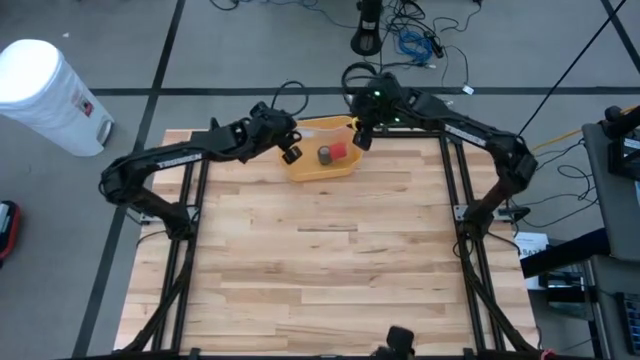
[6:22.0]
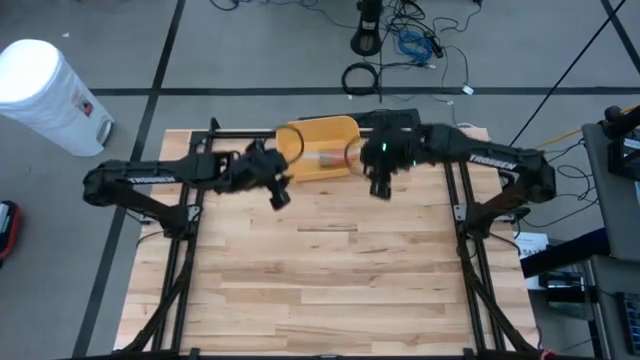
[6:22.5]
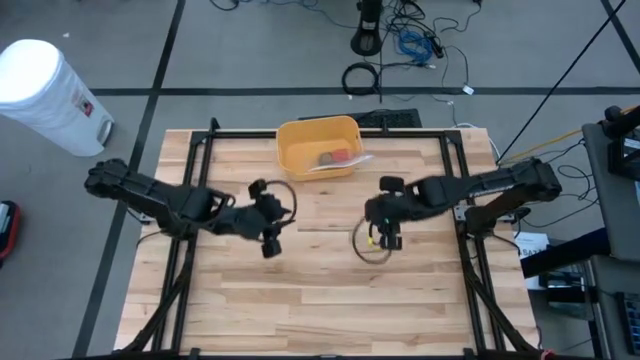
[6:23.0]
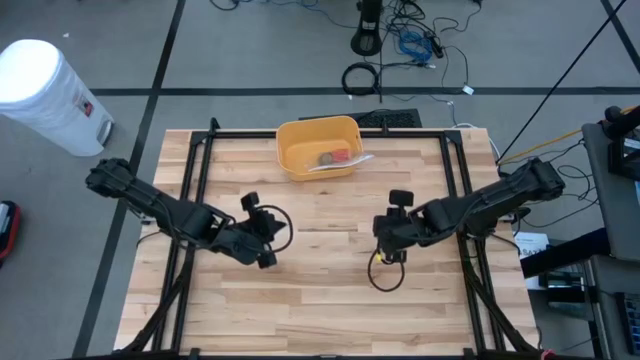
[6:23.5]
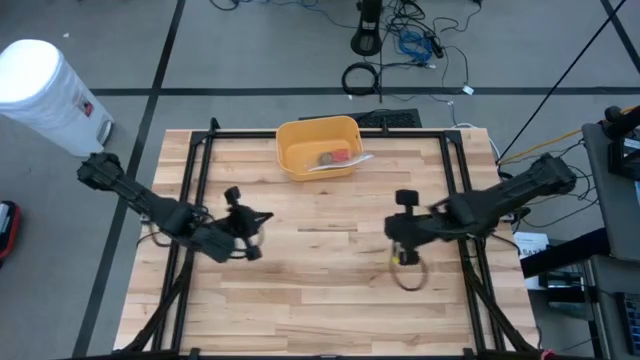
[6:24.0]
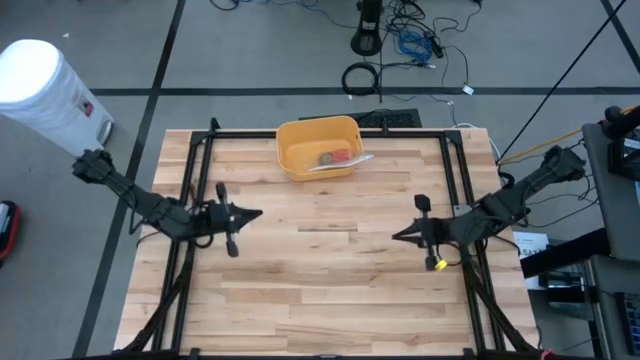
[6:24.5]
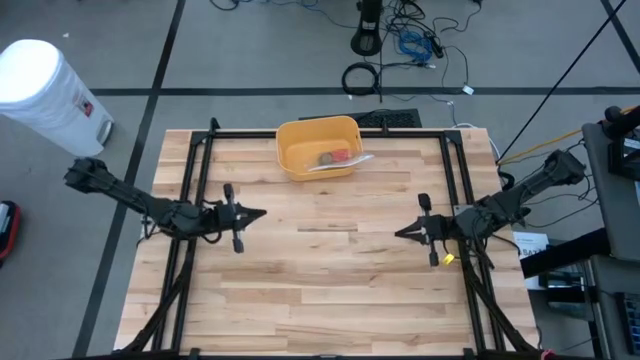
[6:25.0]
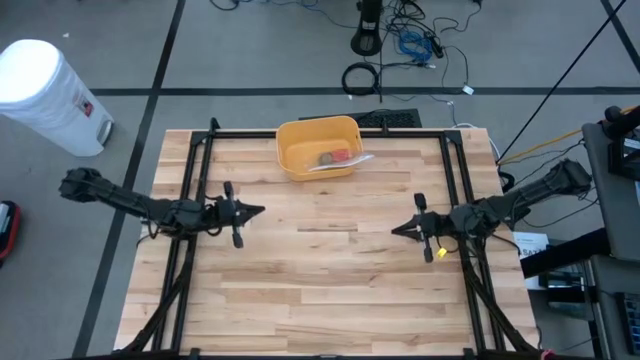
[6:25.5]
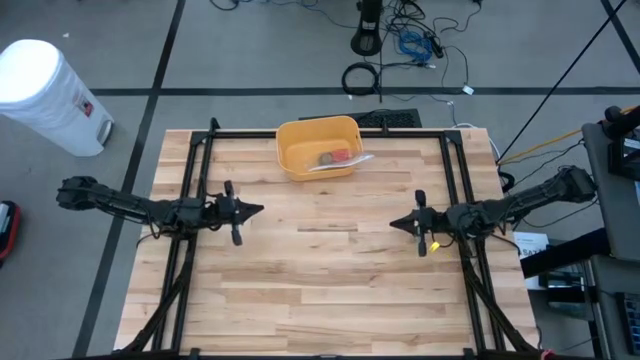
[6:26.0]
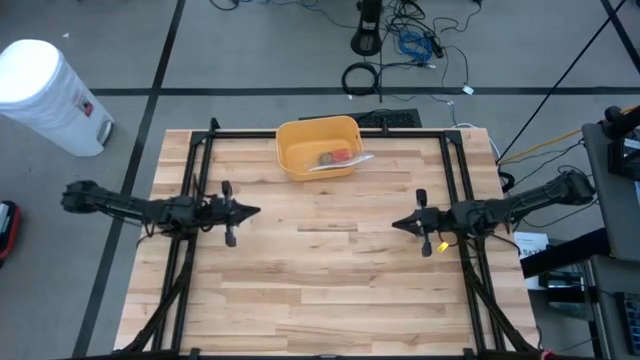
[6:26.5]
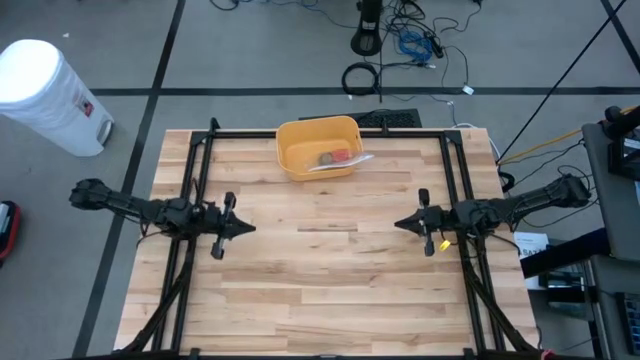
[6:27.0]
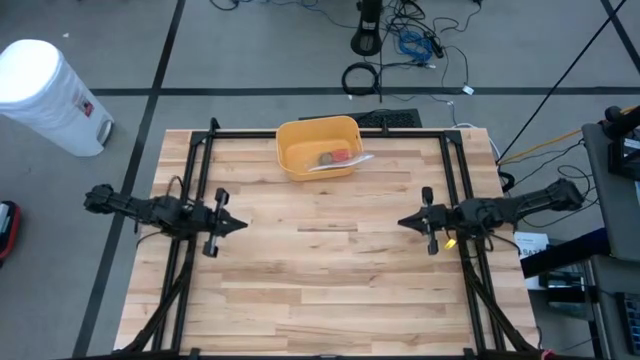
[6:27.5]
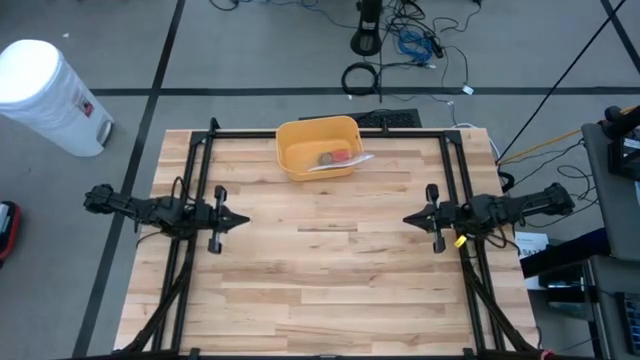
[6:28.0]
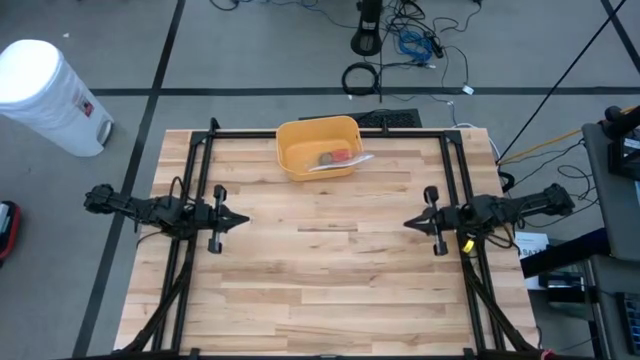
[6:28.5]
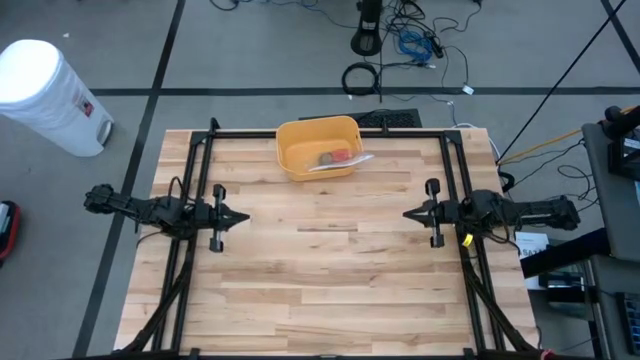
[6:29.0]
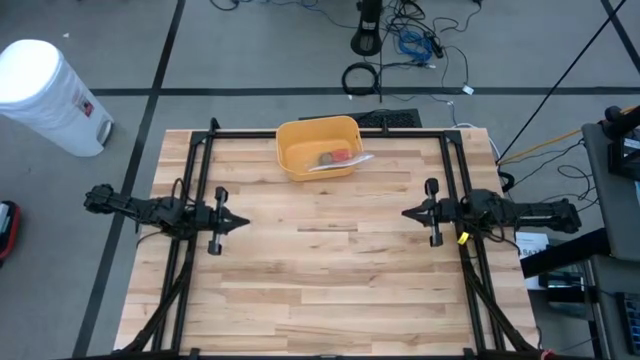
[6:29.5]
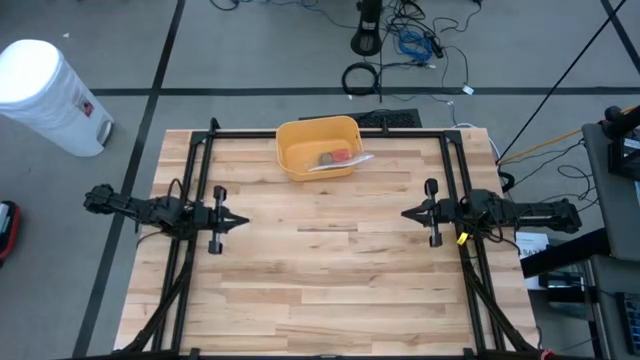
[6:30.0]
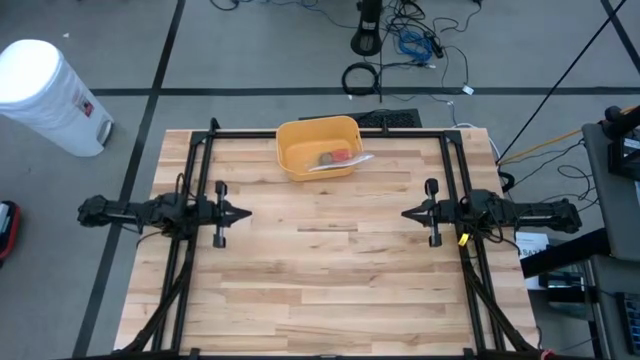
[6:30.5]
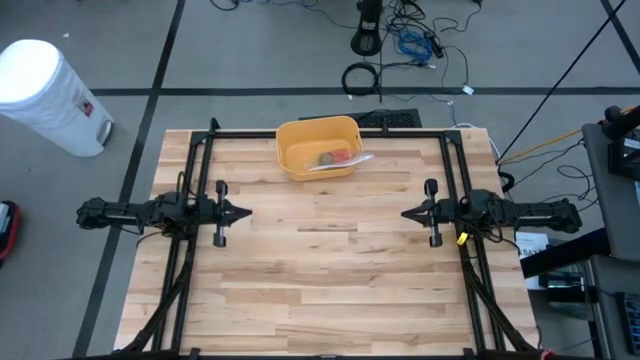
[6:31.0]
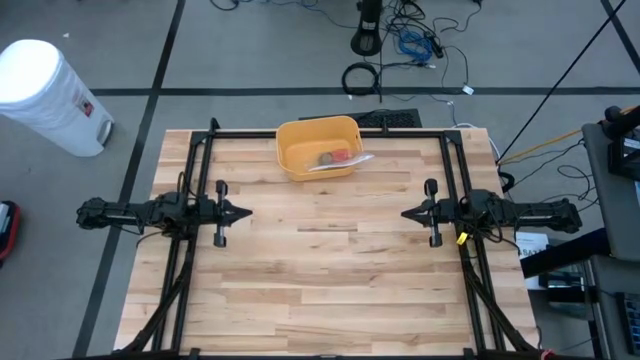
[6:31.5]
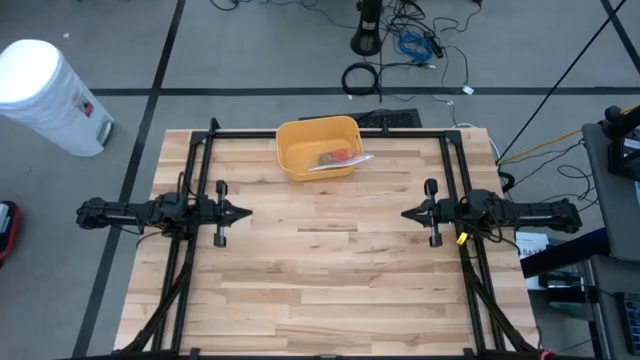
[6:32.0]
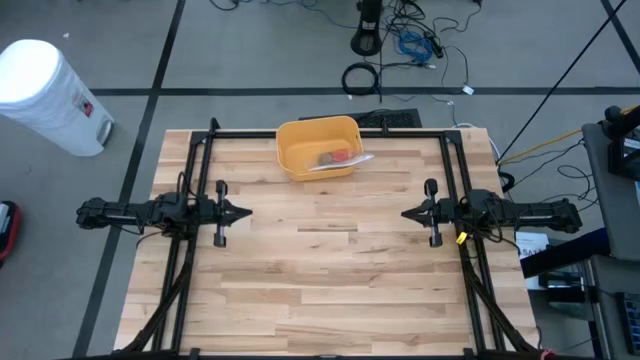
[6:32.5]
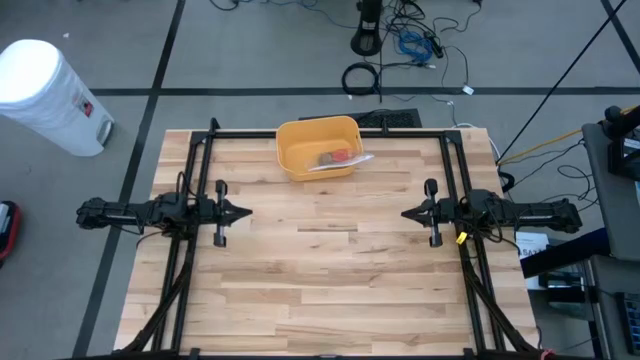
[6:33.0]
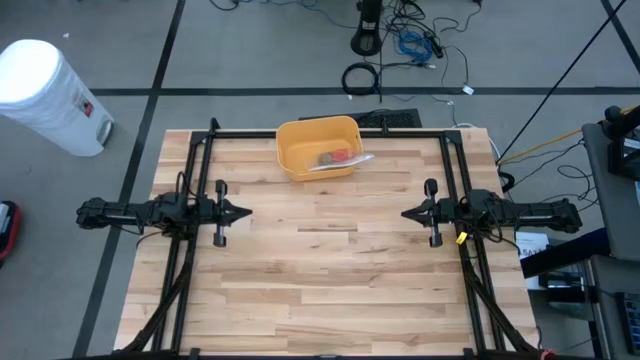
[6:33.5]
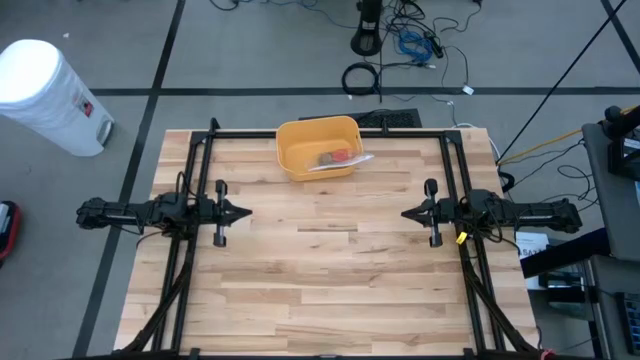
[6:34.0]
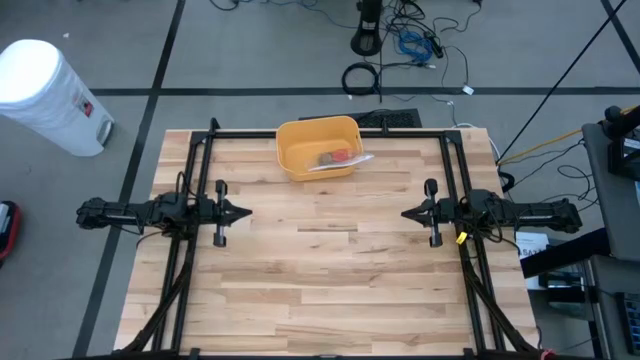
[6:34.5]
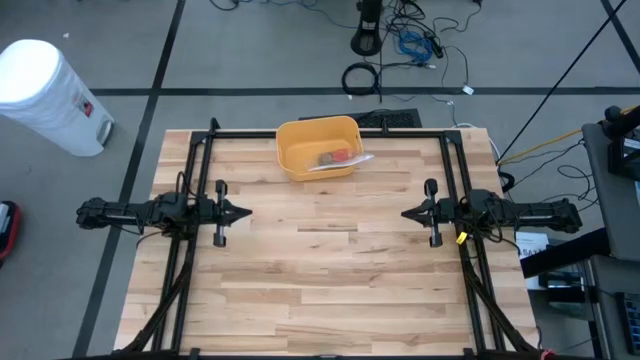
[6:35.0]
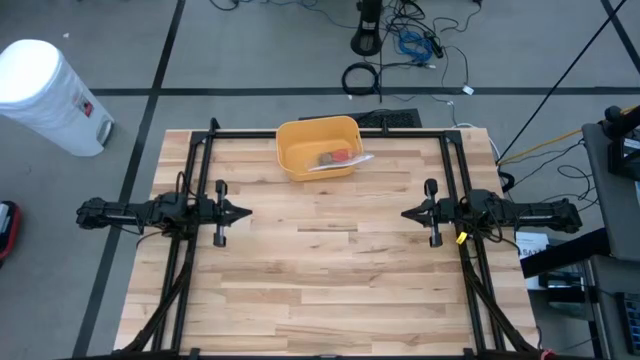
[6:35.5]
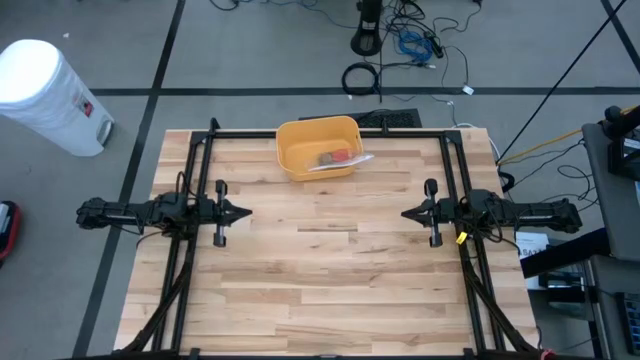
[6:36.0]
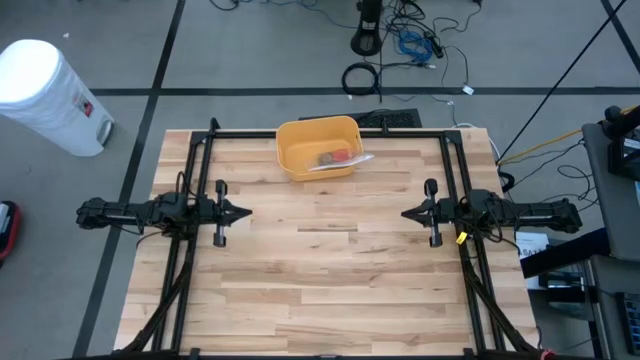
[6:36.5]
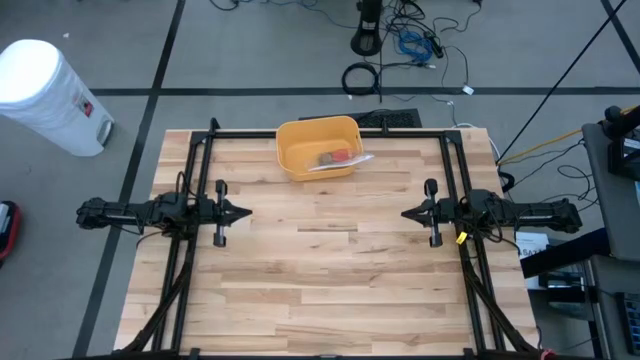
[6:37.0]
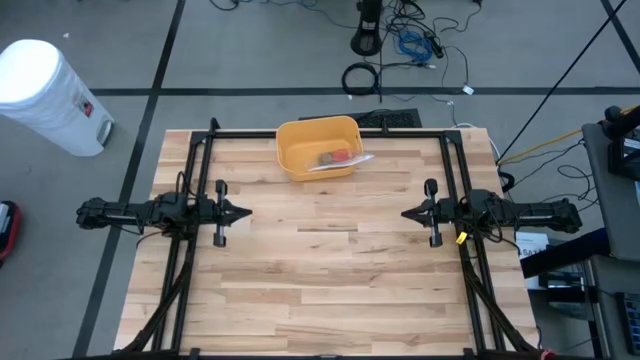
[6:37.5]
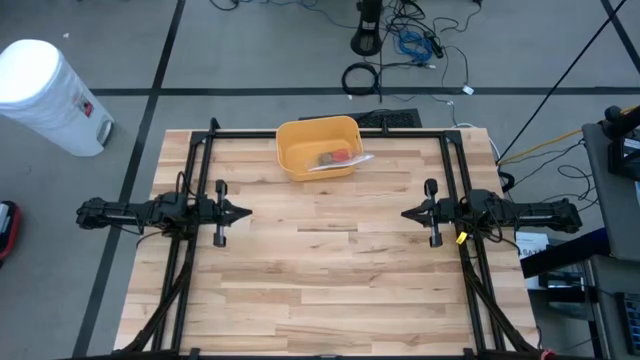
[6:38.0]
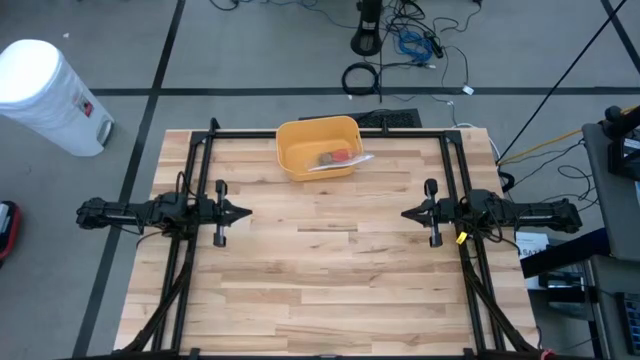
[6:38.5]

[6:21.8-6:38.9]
Task: Roll bandage
Return to Home Position

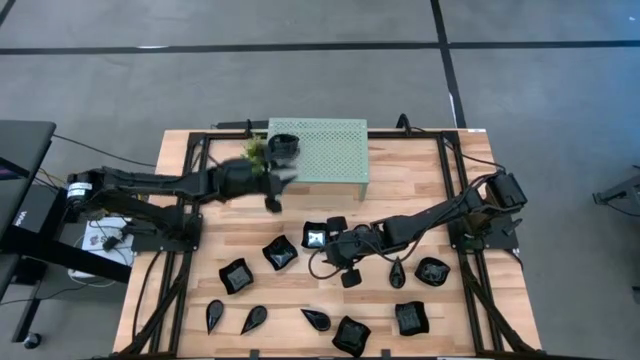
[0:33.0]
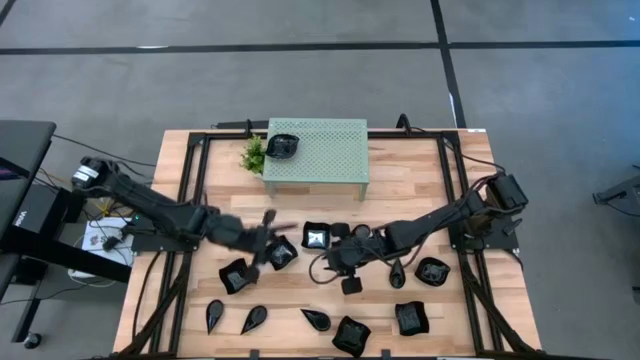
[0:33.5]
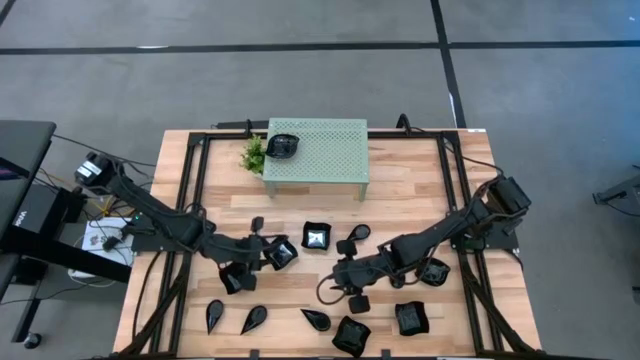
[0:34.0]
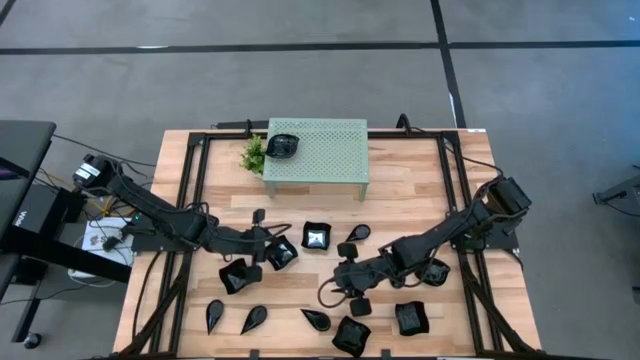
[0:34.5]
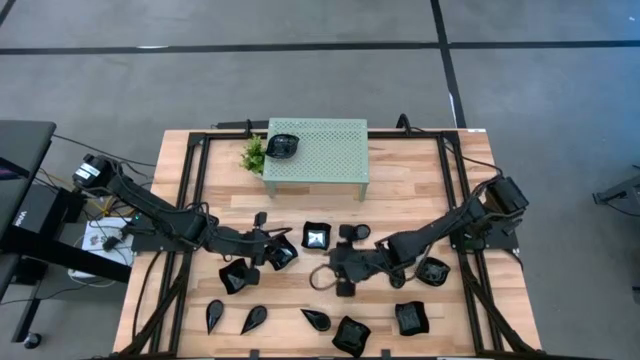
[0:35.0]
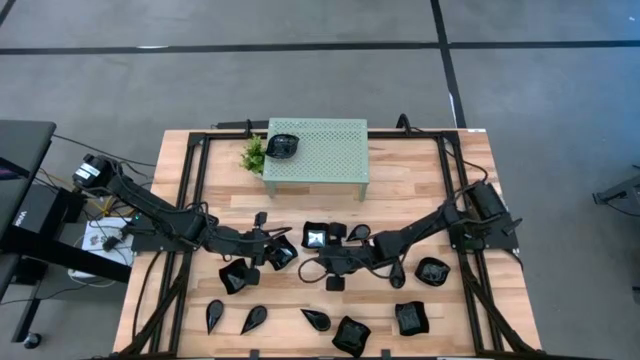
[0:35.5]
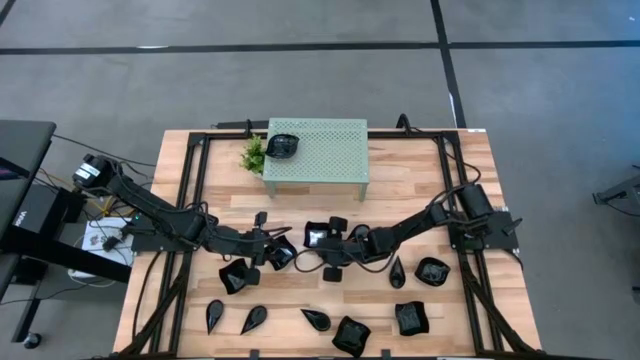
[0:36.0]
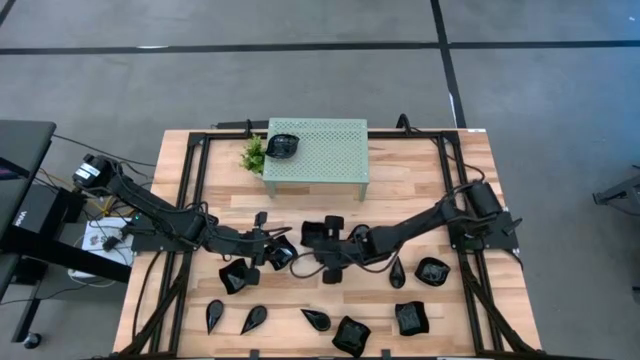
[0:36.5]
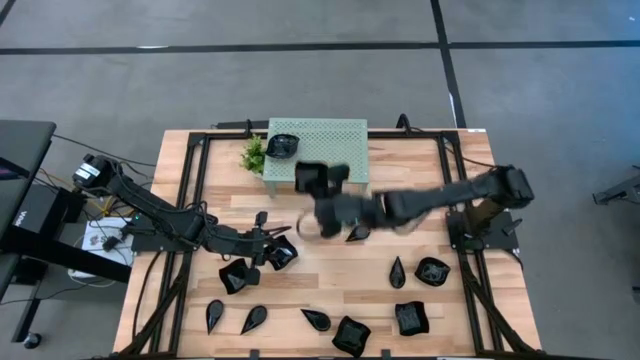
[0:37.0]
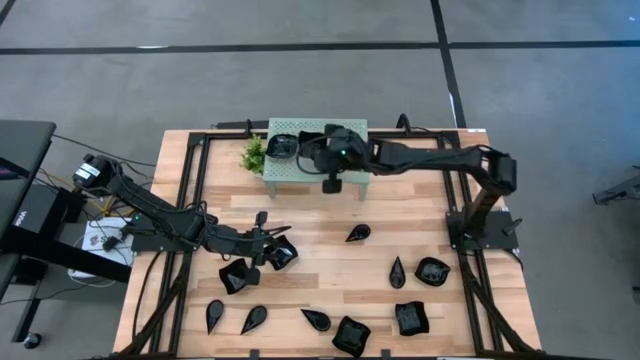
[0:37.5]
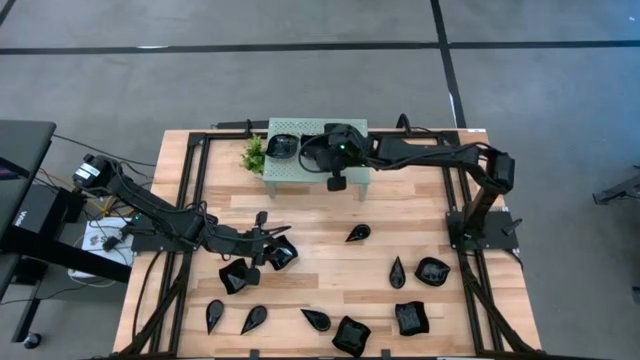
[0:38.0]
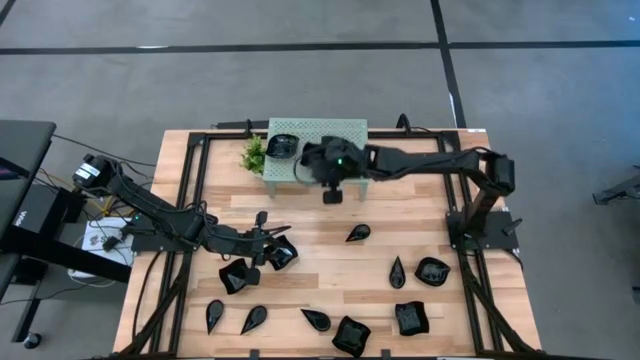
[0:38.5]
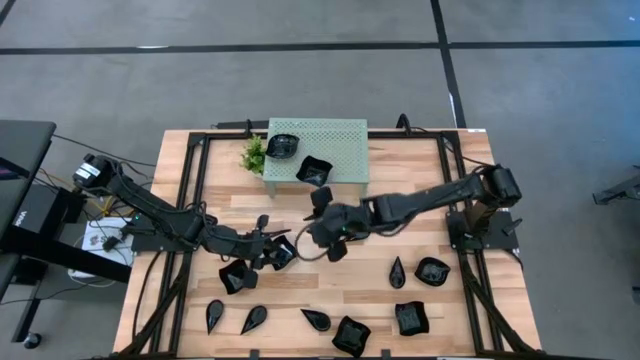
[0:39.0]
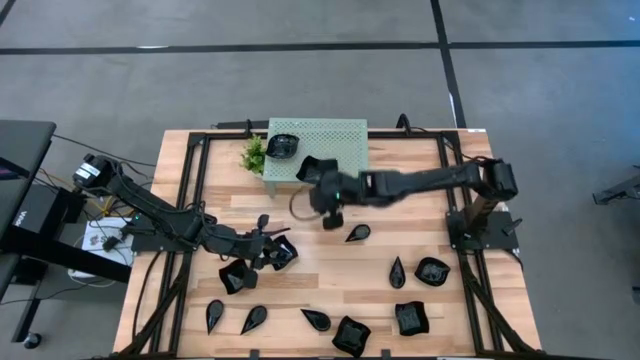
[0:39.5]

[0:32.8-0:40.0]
Task: Pick & Place Mini shaped plates
Put the distorted square plate on the shelf
